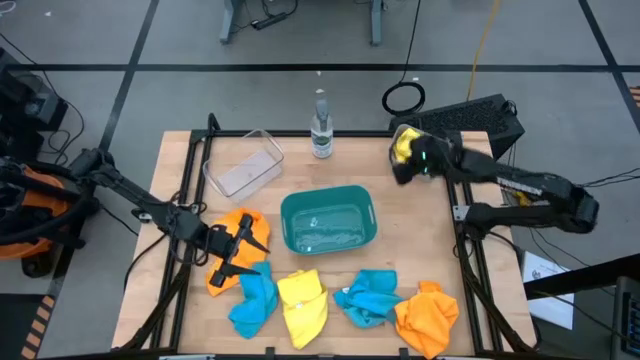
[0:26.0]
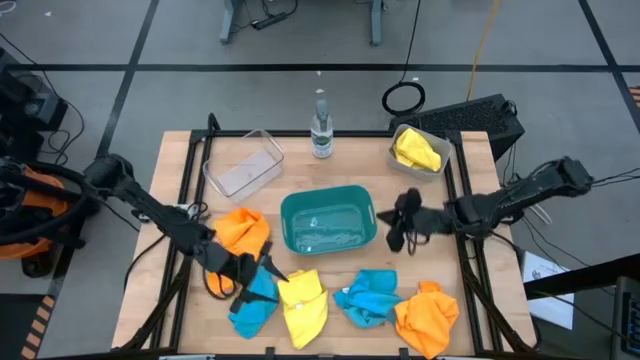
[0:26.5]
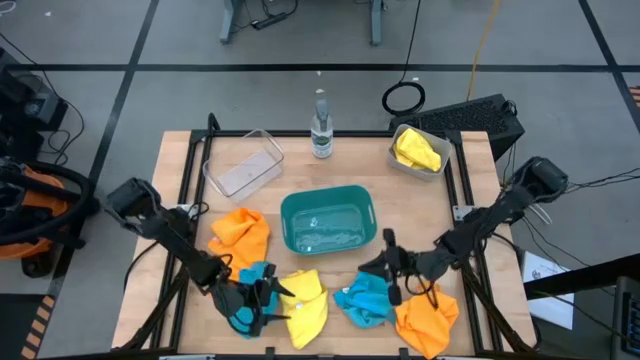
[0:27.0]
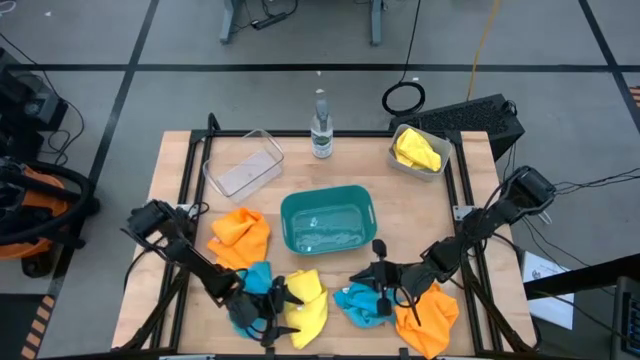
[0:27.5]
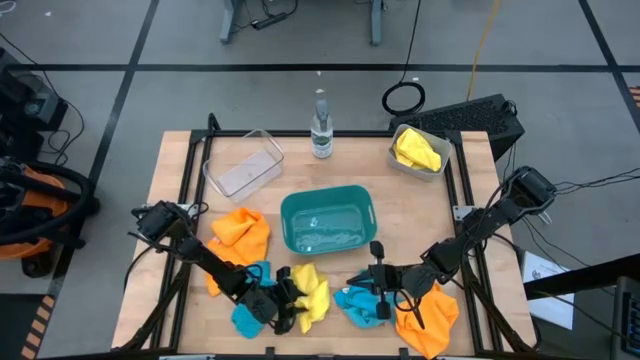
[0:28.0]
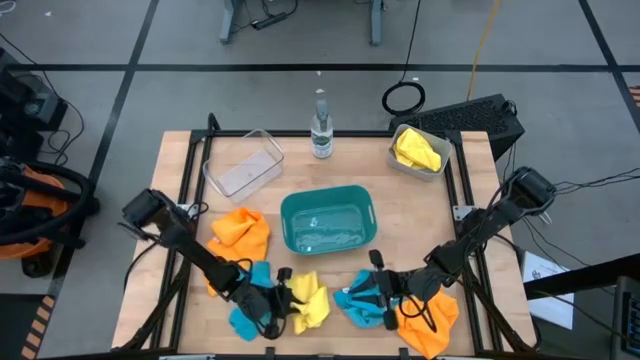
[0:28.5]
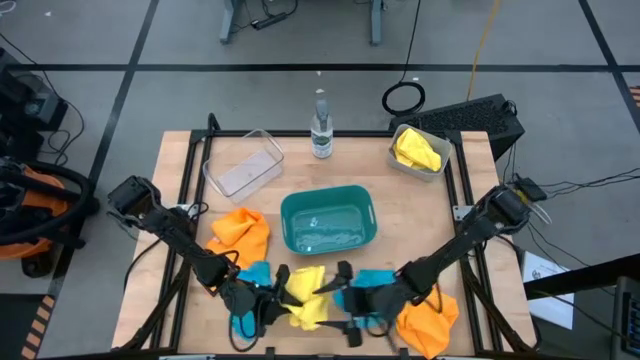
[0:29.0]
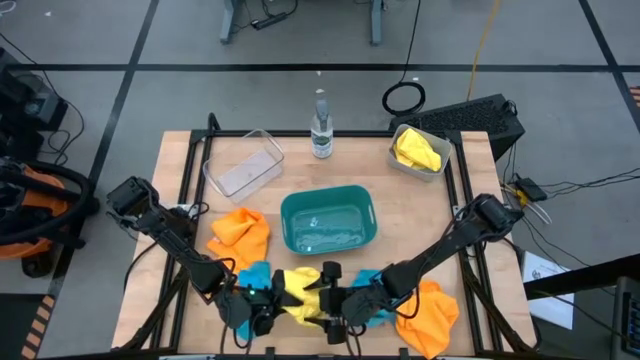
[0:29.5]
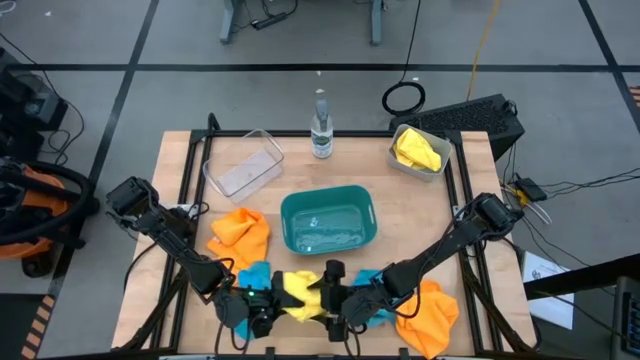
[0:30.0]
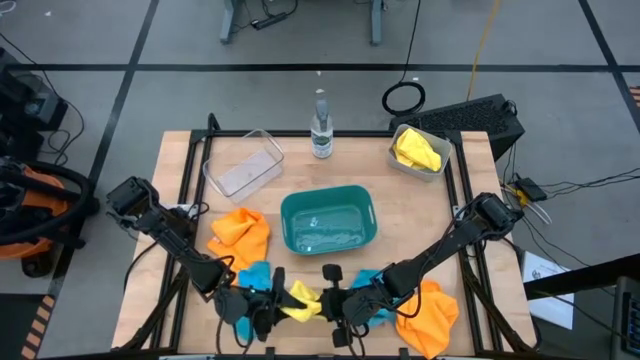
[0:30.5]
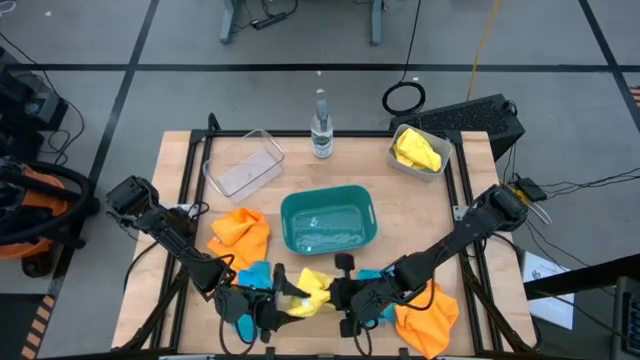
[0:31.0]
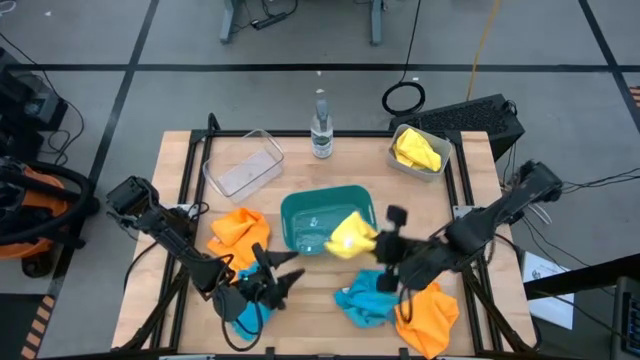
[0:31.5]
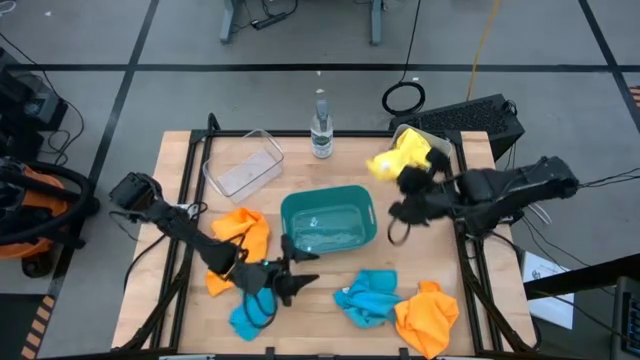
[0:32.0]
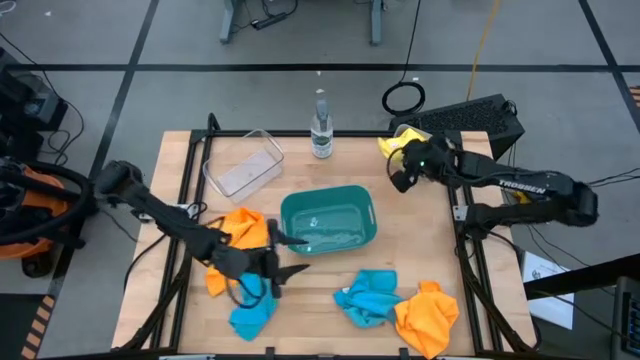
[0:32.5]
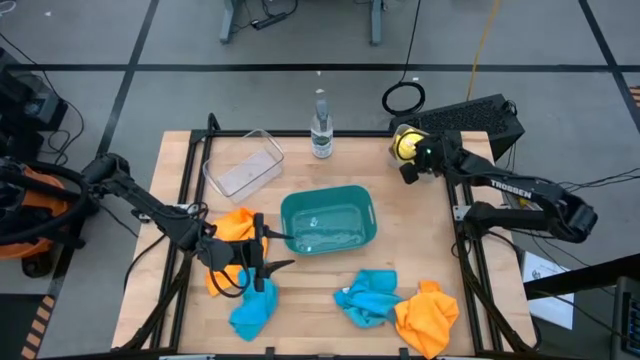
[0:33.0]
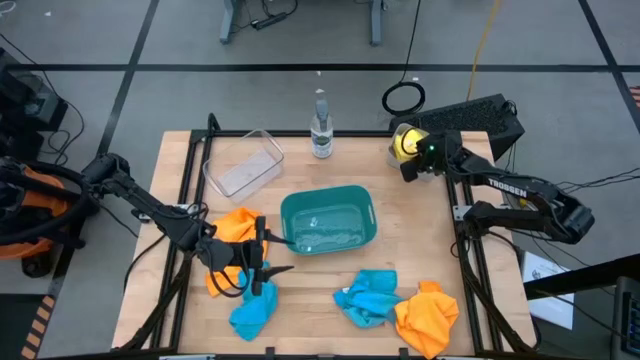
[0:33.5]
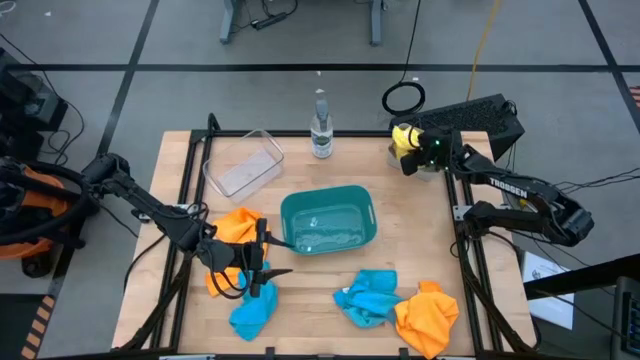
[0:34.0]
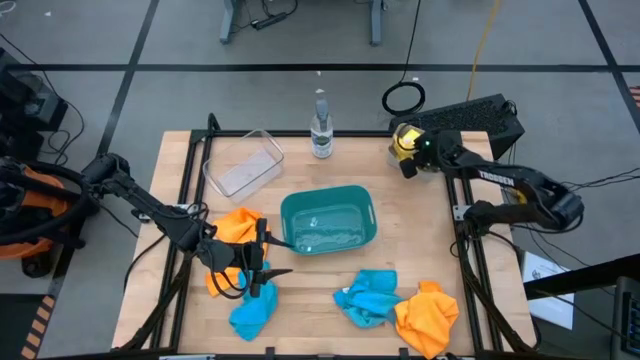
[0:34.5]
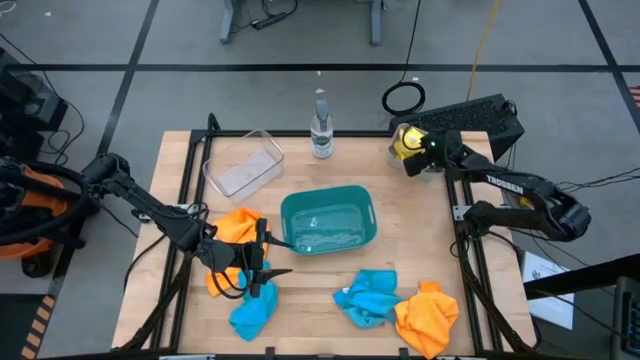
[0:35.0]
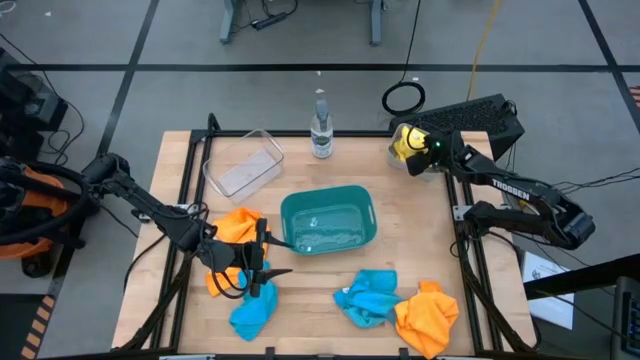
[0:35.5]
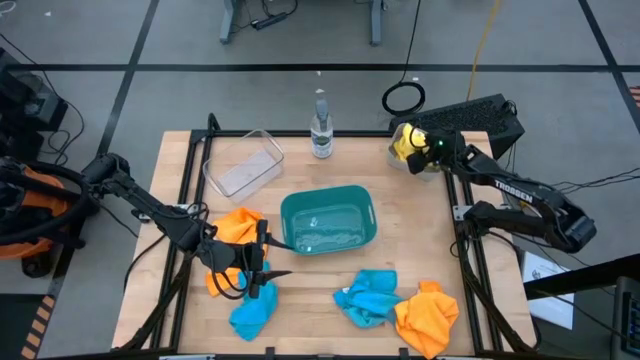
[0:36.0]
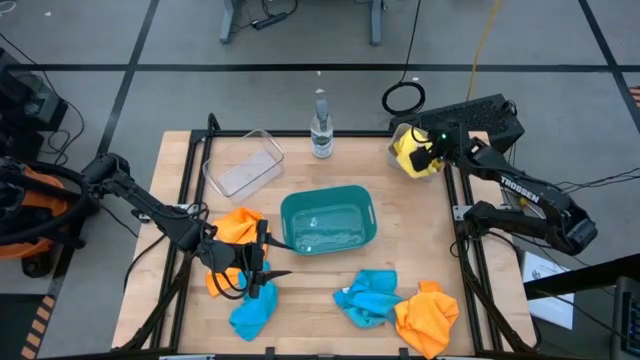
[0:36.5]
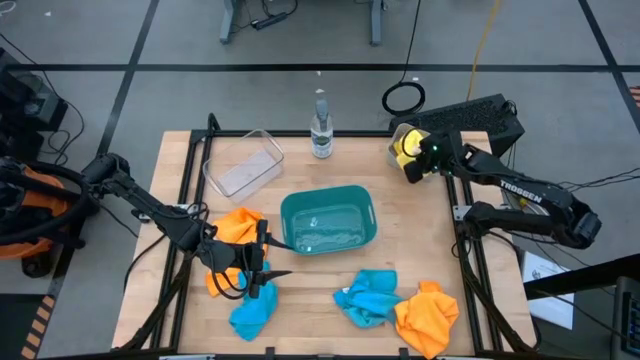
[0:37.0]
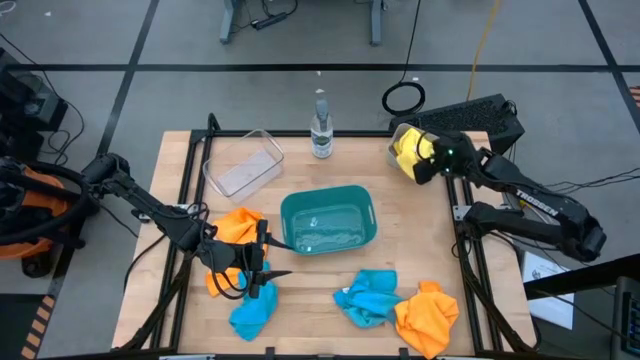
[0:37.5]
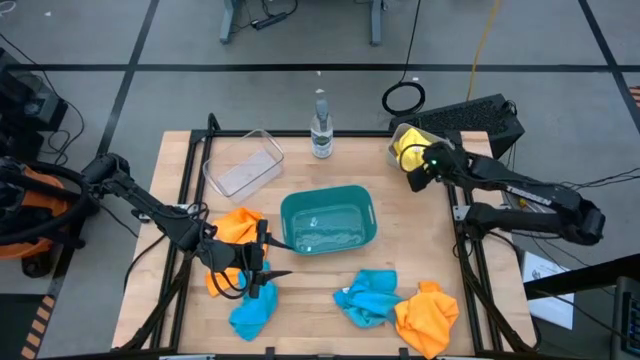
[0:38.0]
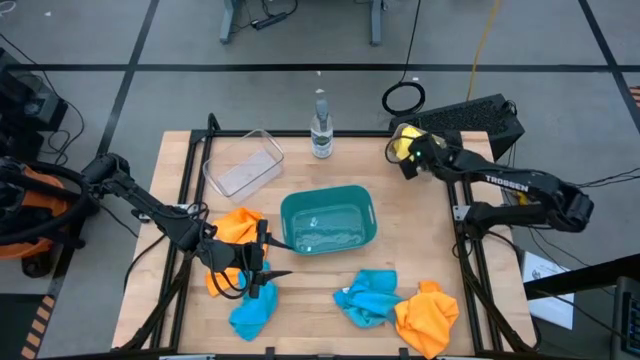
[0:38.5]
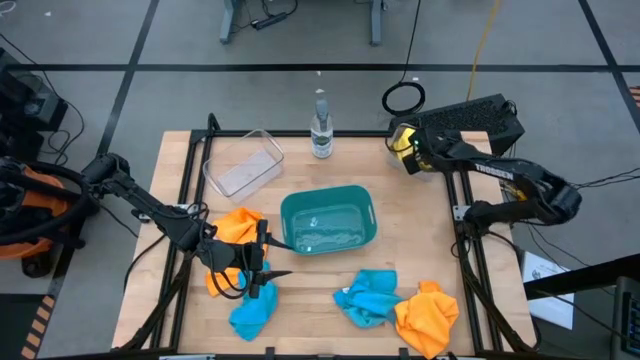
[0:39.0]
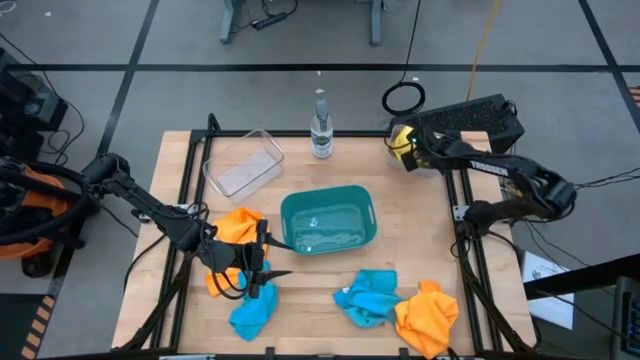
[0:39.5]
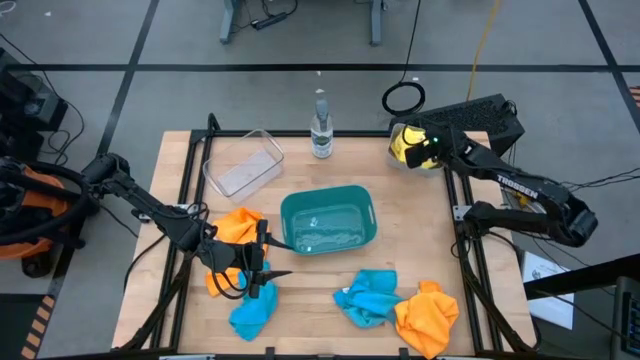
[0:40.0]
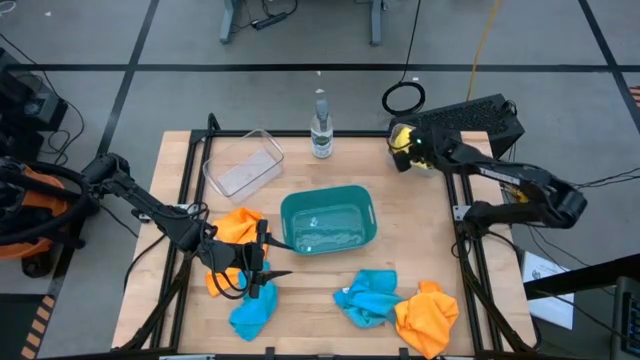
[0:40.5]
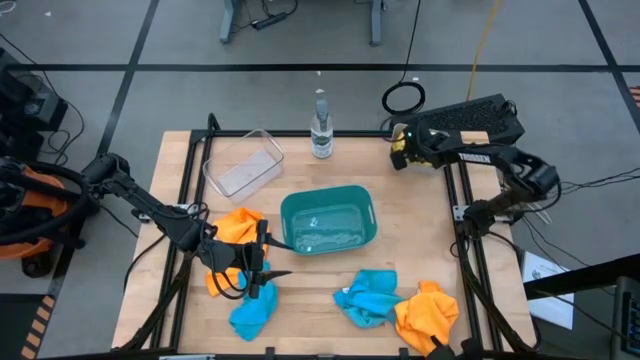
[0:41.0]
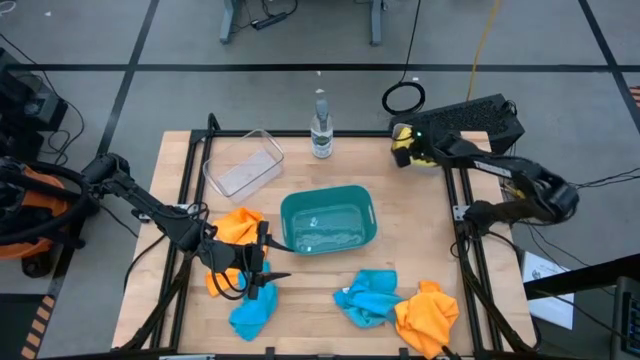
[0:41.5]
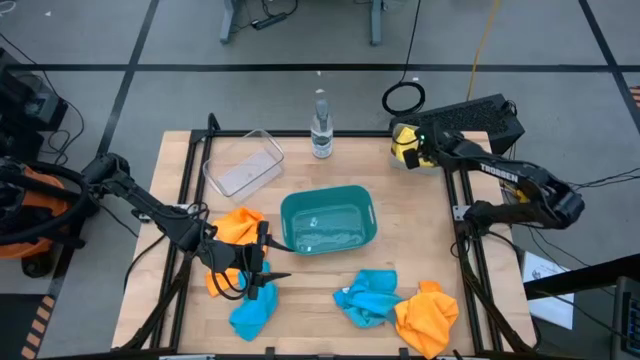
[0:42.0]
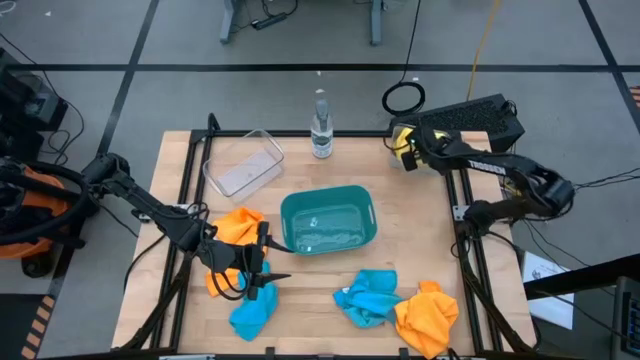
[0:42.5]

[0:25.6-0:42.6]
Task: Sort microfiber towel by color & place in baskets
Put the yellow towel into the gray bin

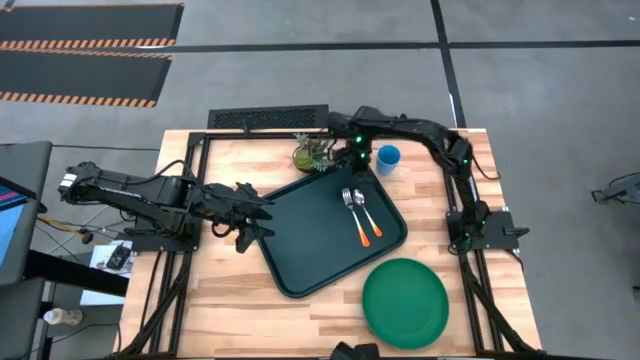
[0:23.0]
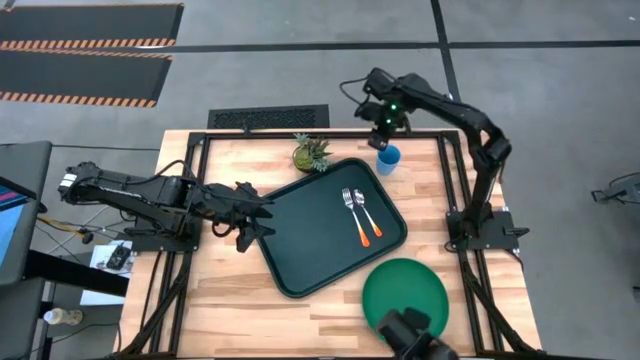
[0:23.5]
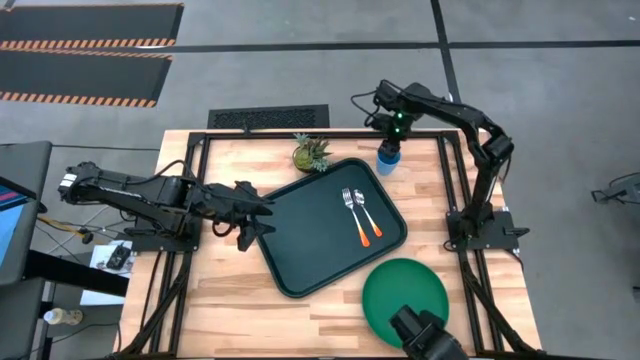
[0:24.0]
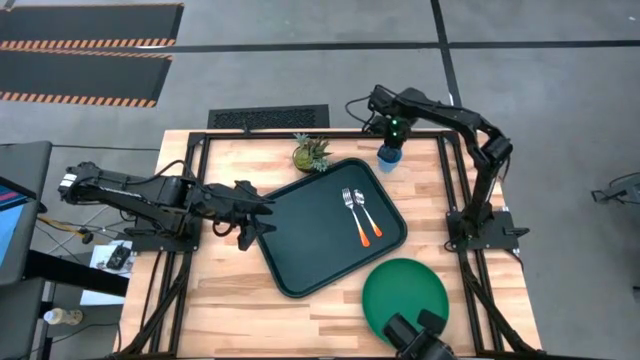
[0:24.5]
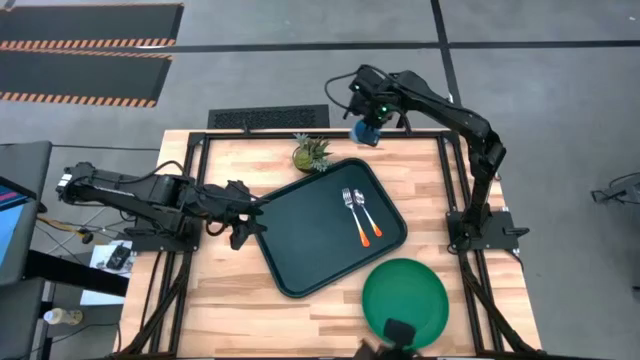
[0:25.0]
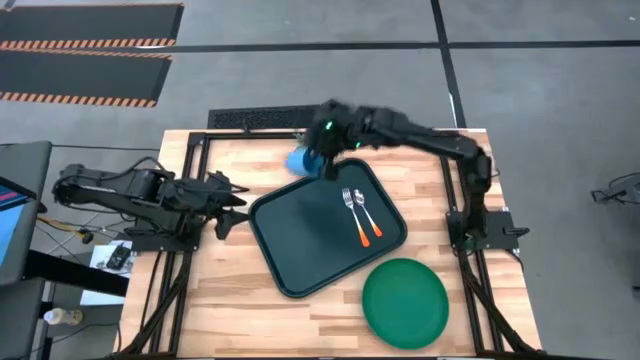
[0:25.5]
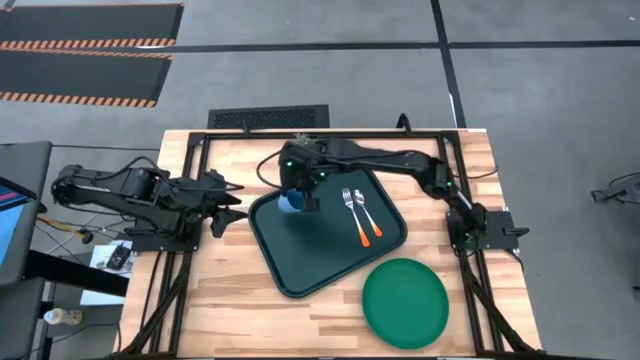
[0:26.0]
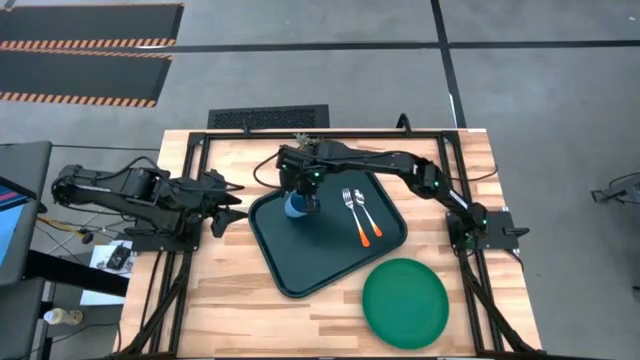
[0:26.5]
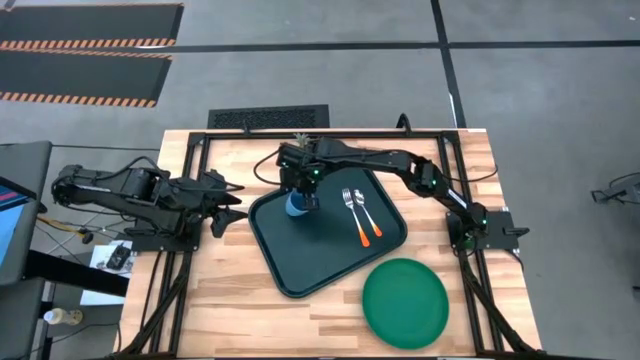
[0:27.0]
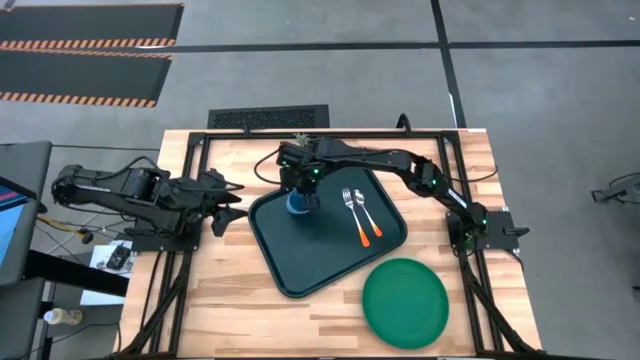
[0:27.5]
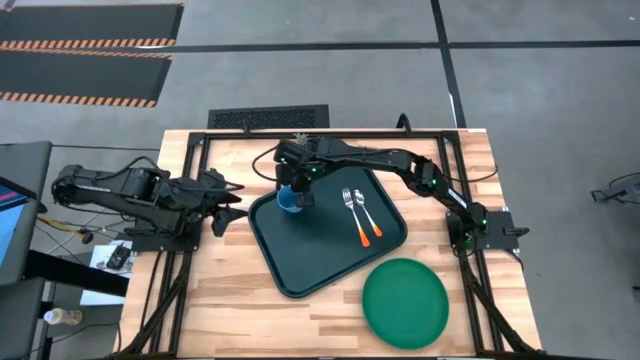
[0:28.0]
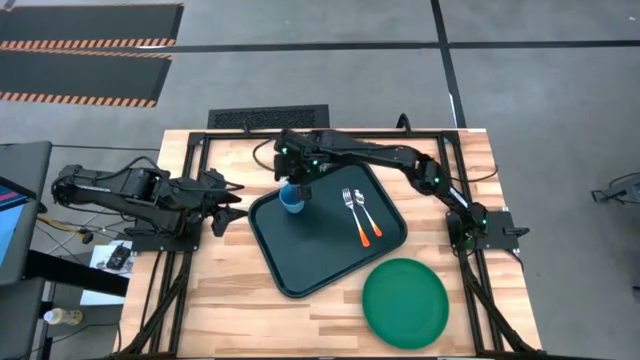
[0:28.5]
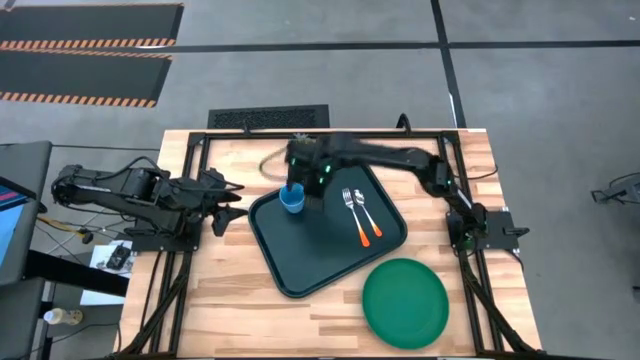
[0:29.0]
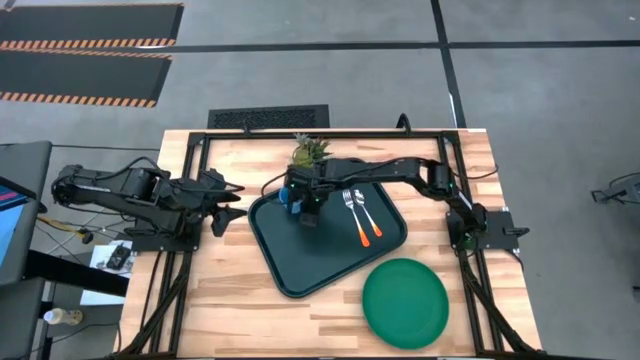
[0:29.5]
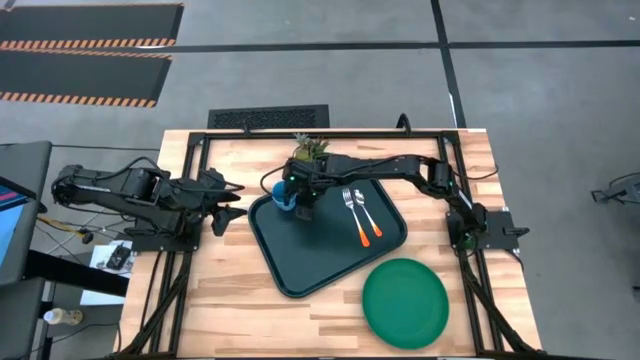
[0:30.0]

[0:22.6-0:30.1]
Task: Pick and place plate/cup/fork/spoon on tray
Put the blue cup to the top right on the black serving tray
